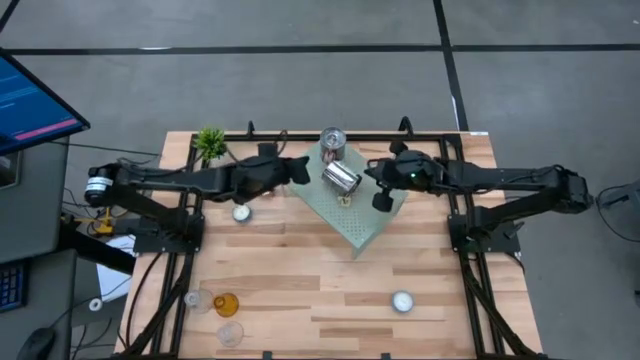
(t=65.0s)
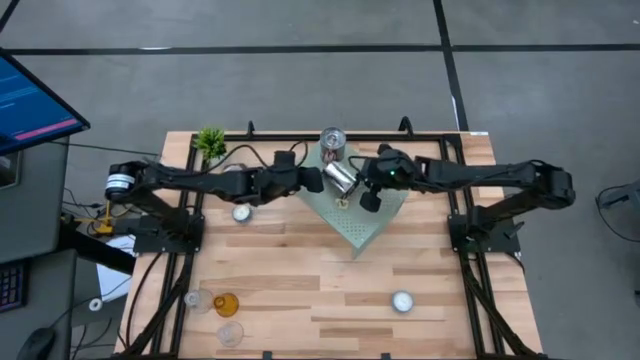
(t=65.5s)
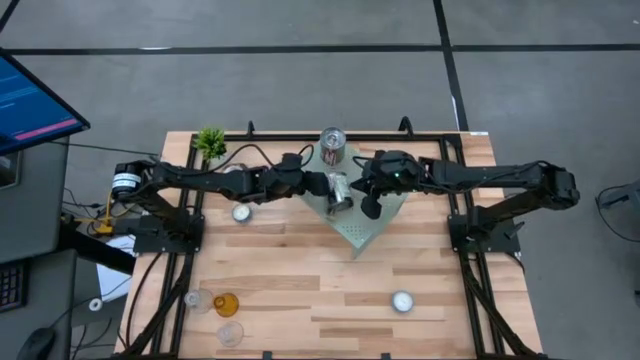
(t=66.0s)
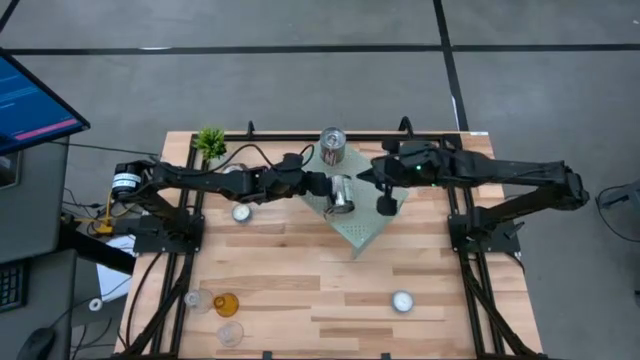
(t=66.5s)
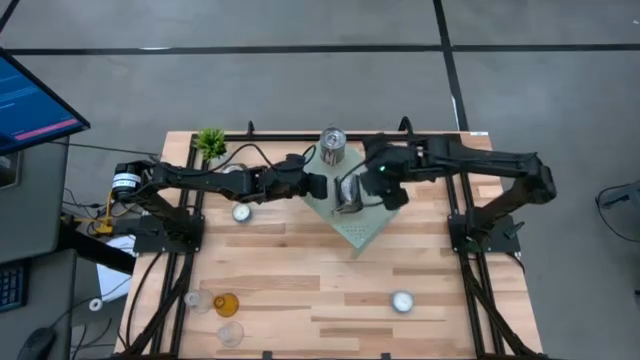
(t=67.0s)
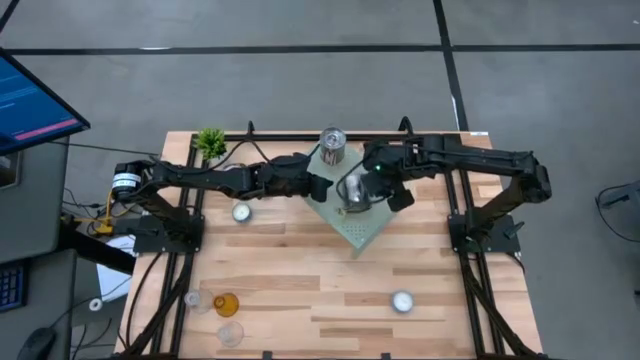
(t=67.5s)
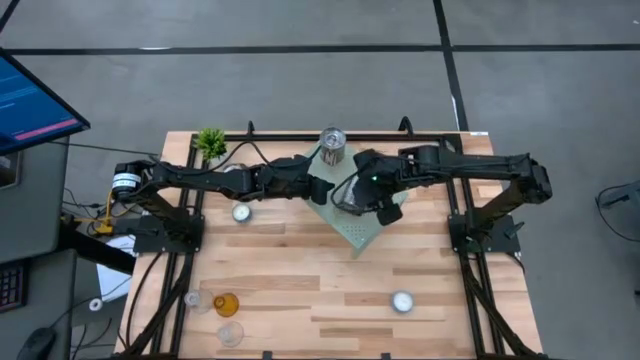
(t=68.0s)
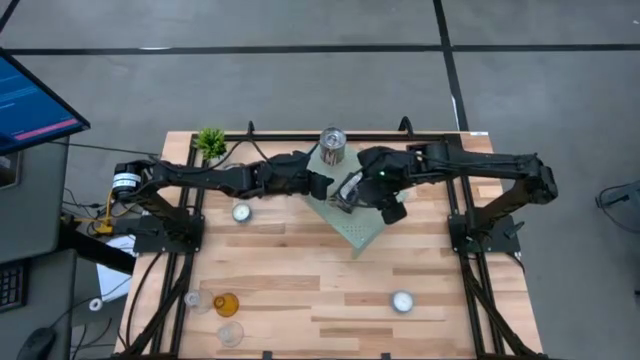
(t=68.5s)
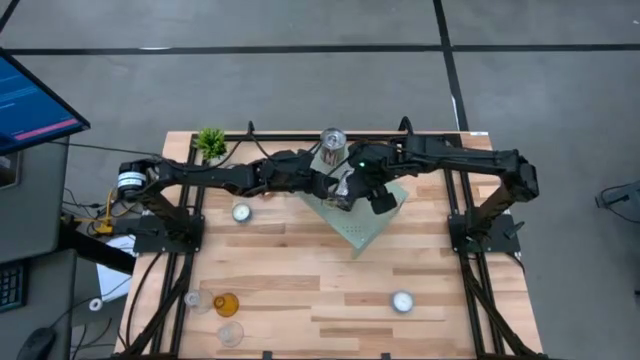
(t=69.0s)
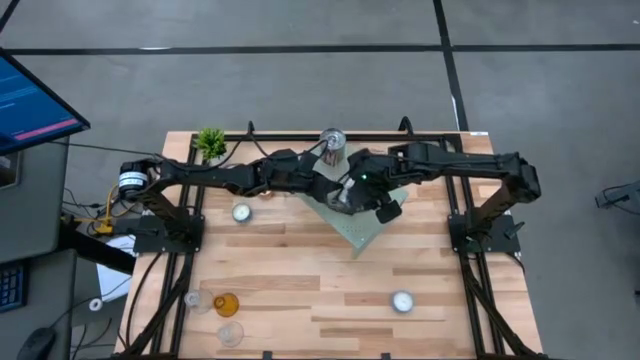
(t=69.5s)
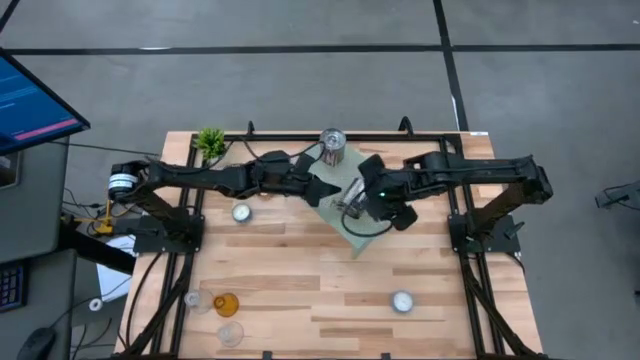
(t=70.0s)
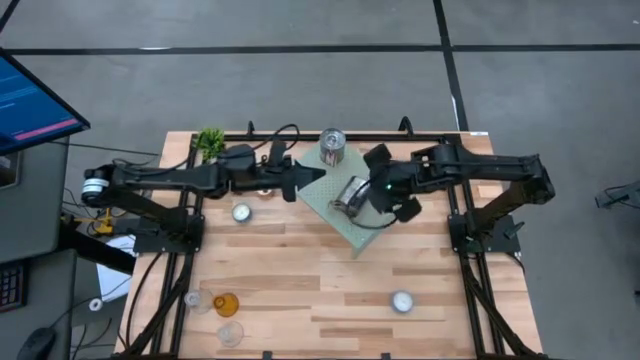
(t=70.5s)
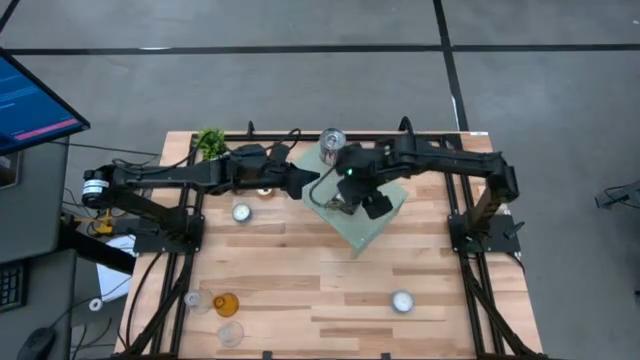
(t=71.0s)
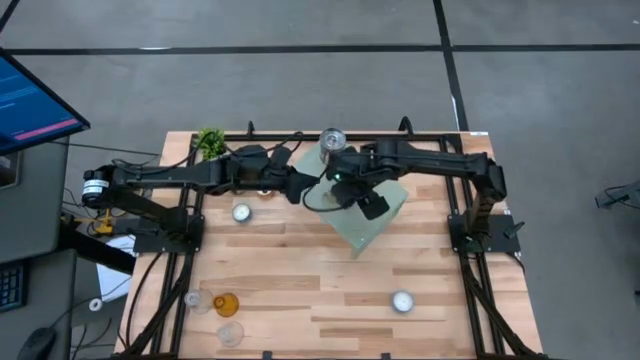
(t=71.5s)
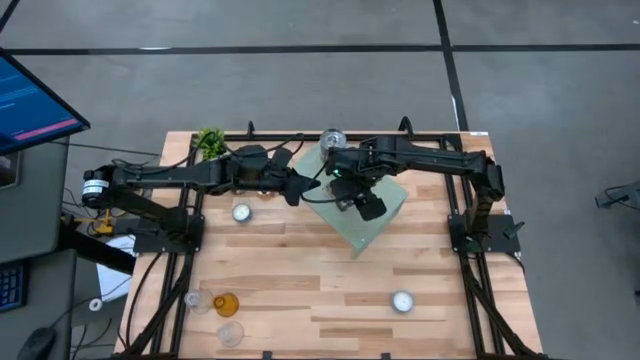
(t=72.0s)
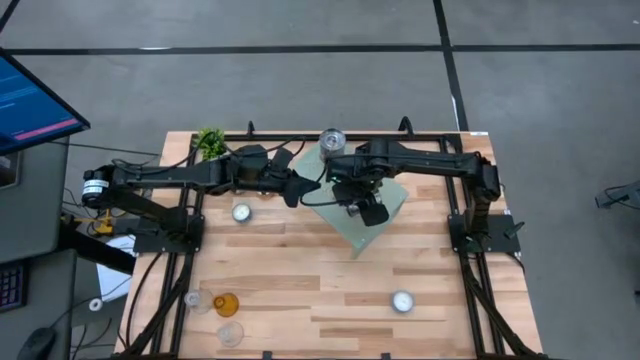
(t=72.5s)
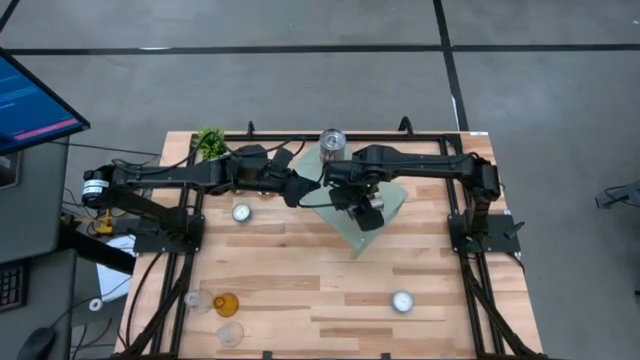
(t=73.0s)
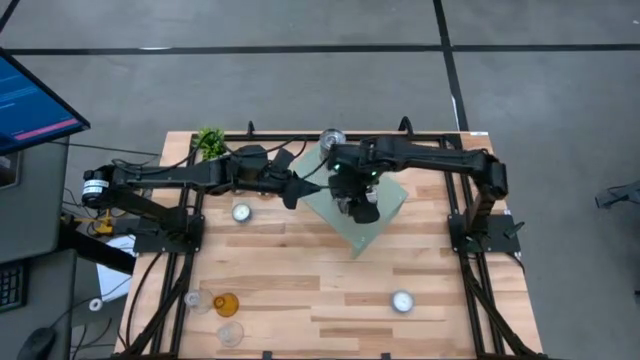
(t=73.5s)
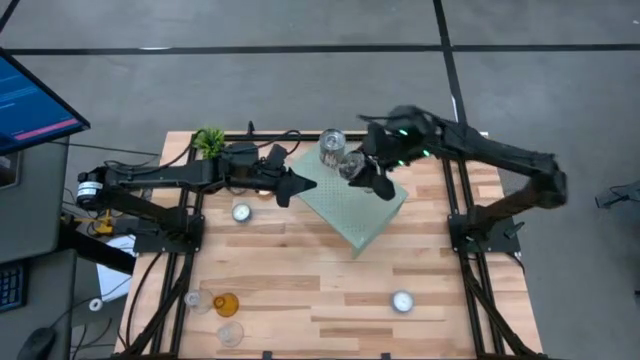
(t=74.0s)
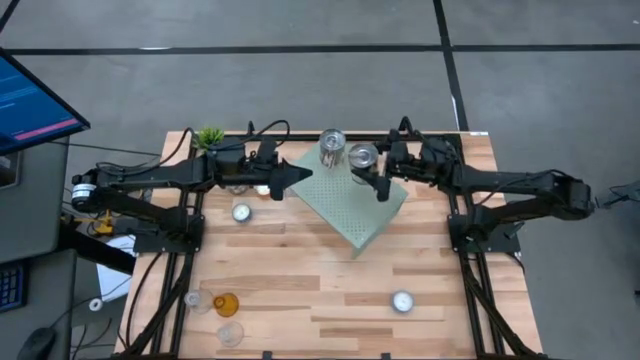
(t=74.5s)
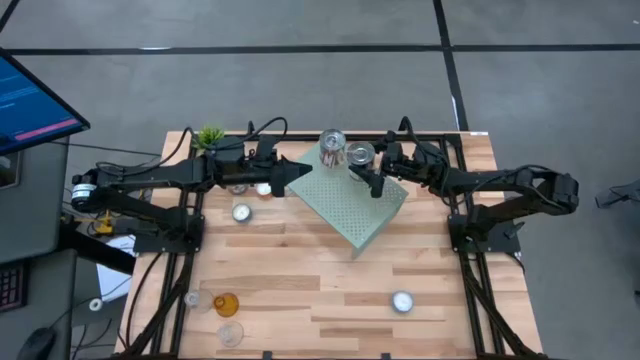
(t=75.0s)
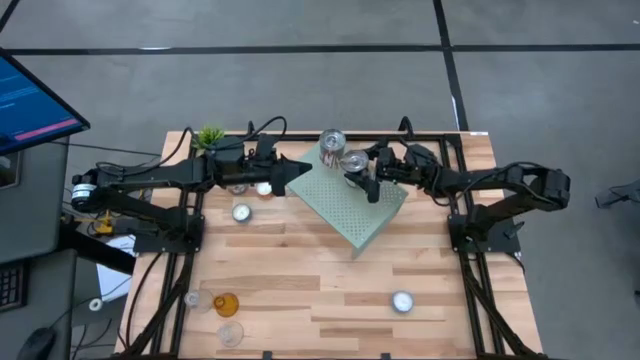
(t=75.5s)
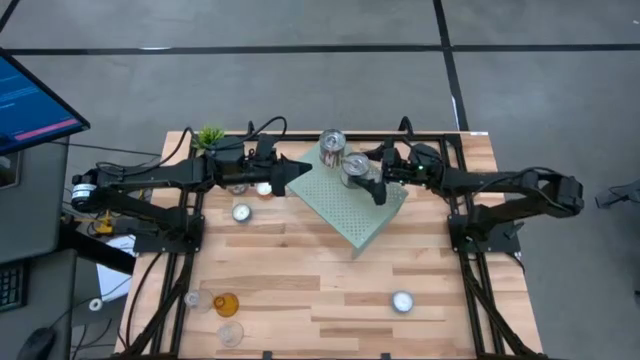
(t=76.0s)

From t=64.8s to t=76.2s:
Task: Stock candles on shelf
Put the bottom silver scented candle on the shelf

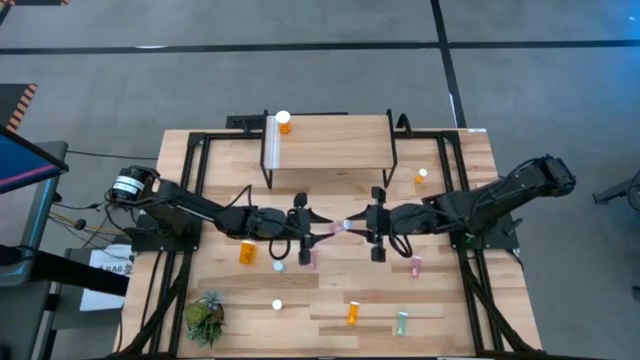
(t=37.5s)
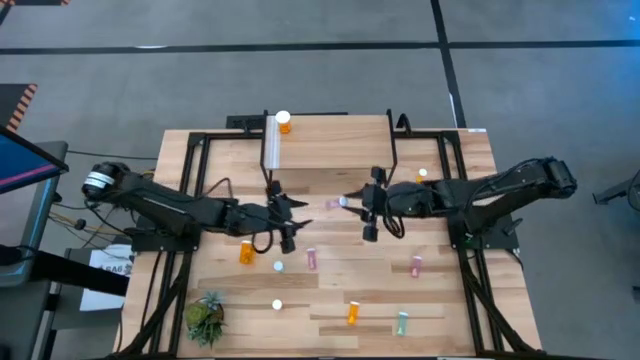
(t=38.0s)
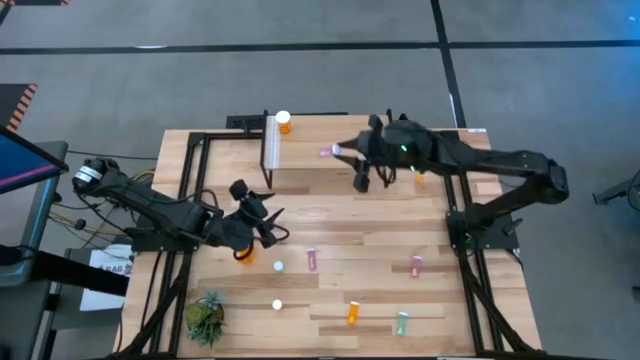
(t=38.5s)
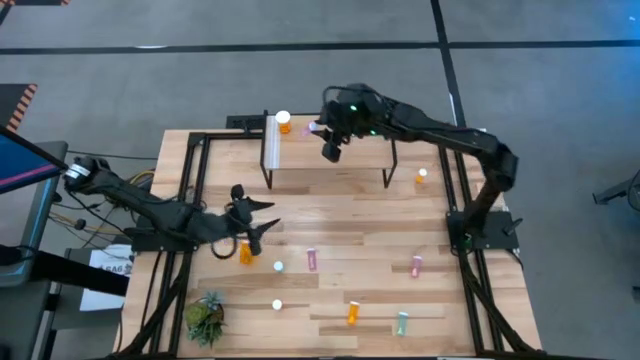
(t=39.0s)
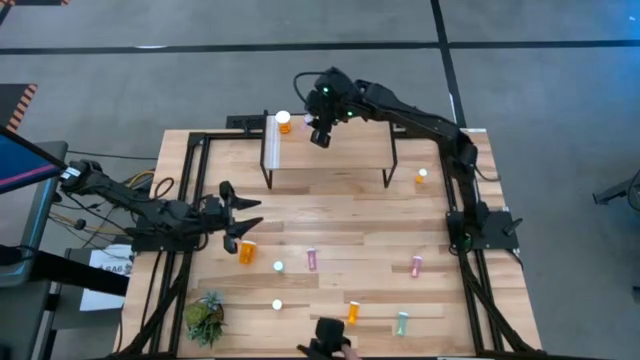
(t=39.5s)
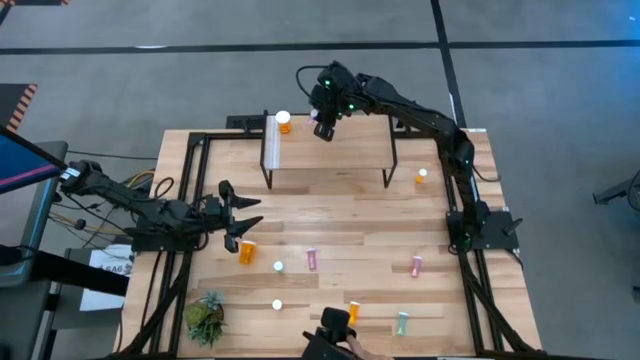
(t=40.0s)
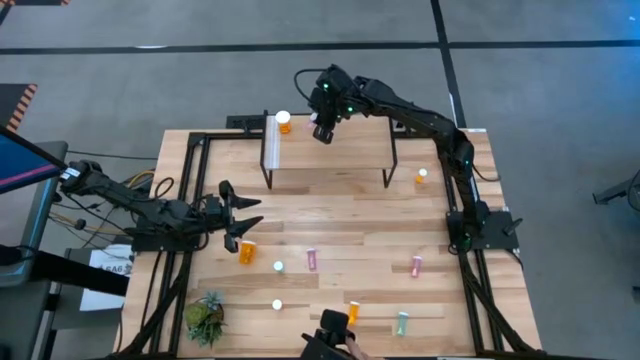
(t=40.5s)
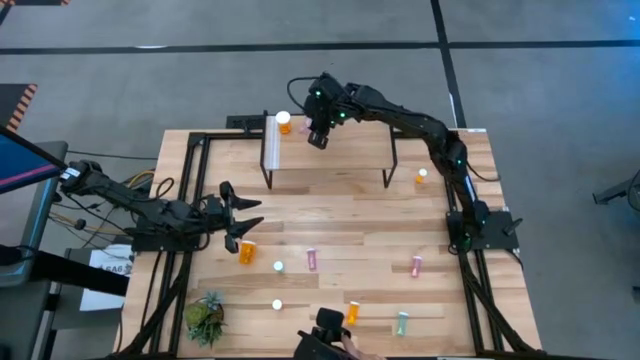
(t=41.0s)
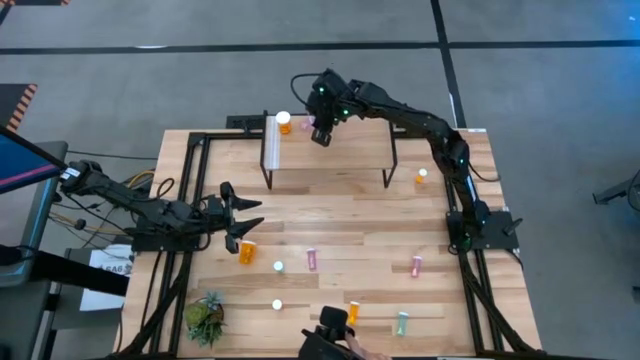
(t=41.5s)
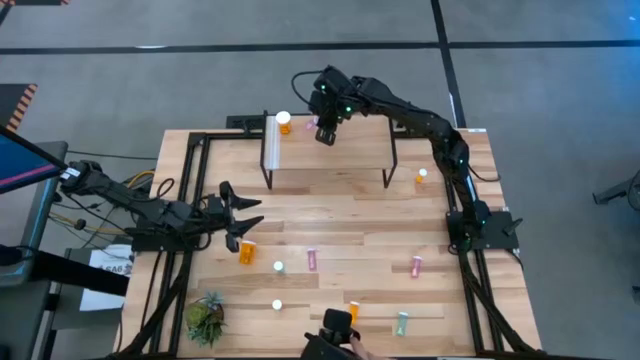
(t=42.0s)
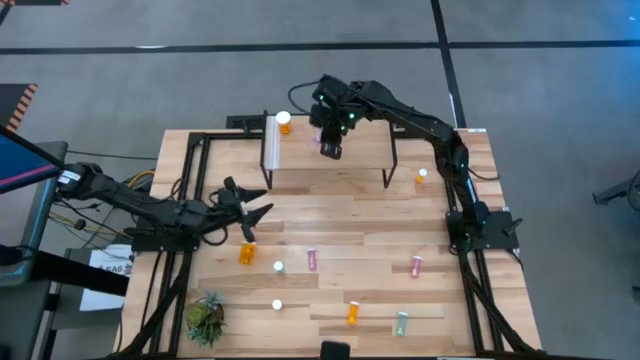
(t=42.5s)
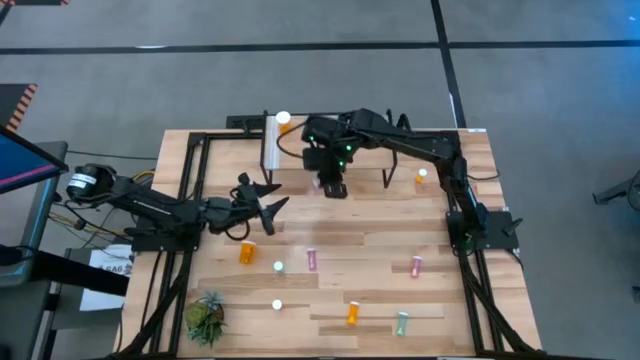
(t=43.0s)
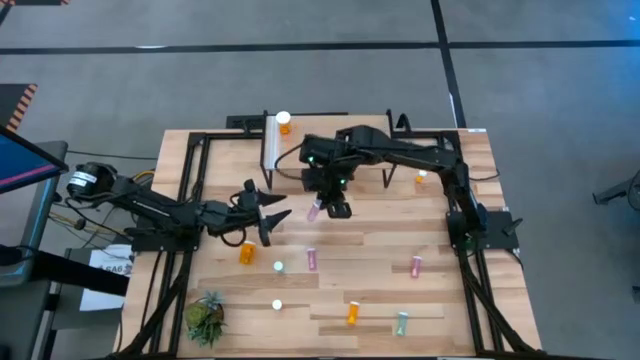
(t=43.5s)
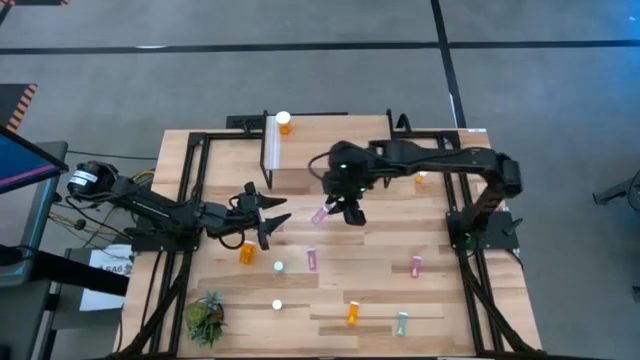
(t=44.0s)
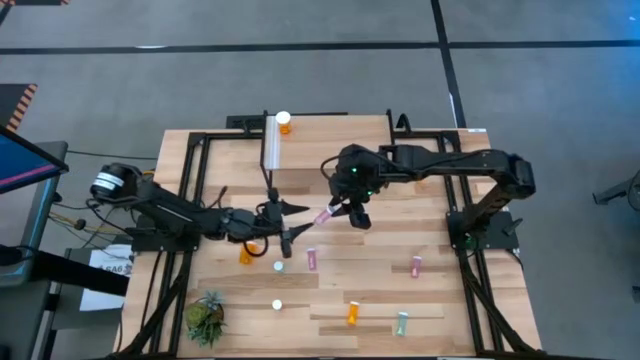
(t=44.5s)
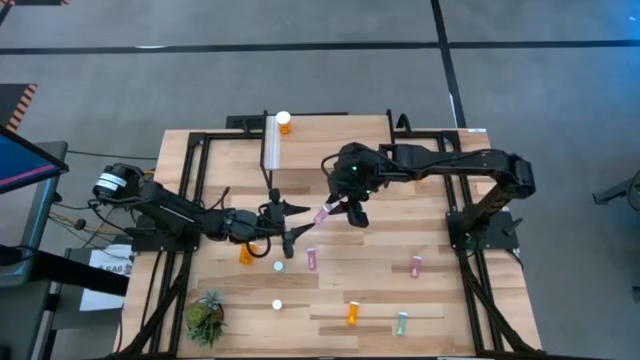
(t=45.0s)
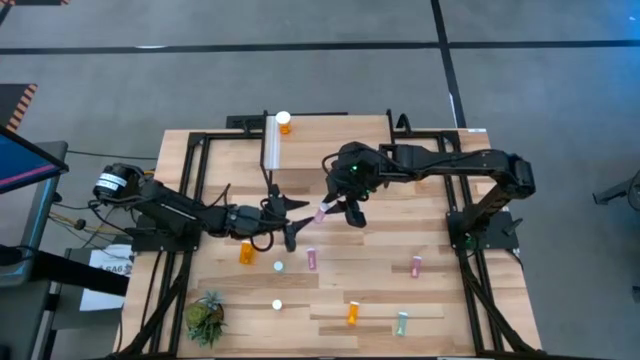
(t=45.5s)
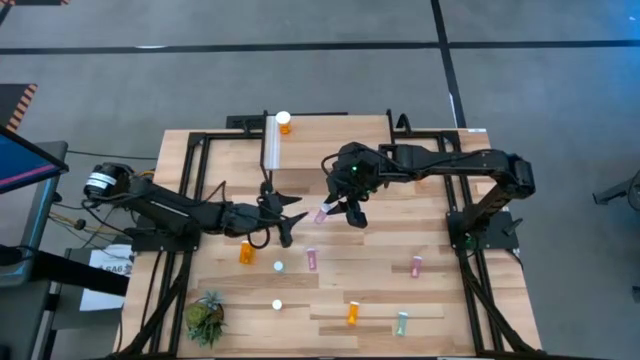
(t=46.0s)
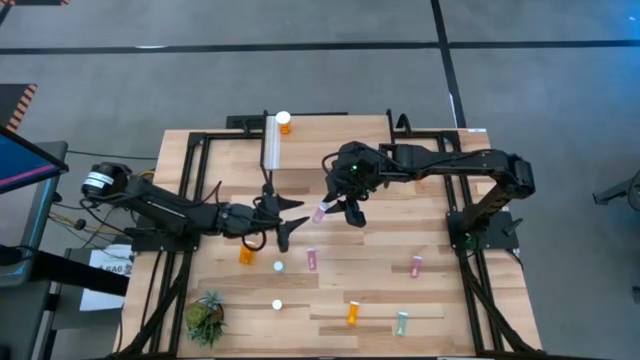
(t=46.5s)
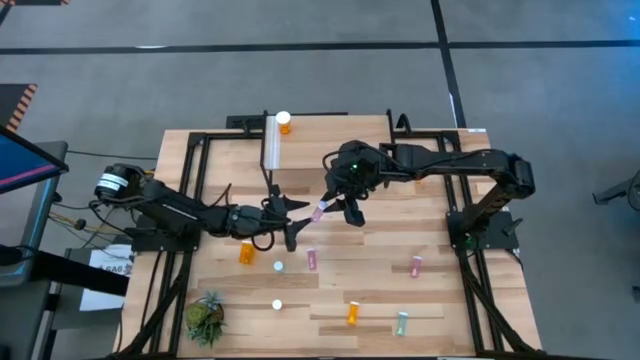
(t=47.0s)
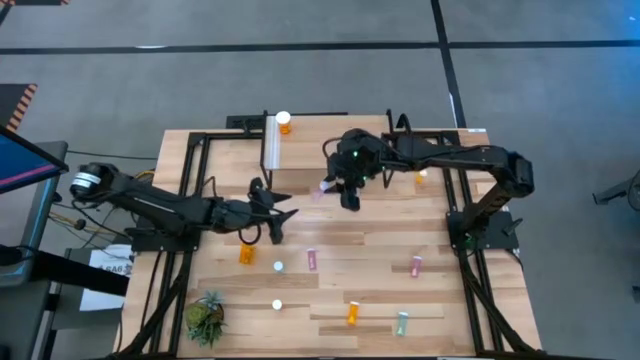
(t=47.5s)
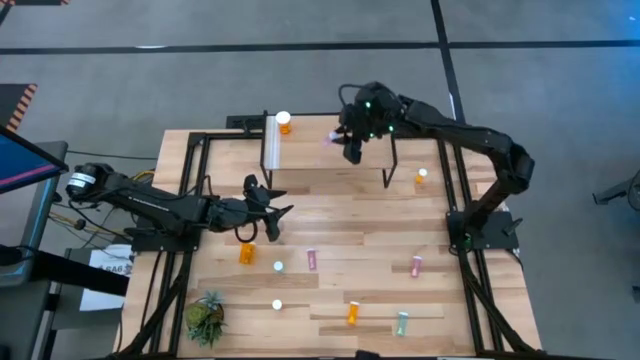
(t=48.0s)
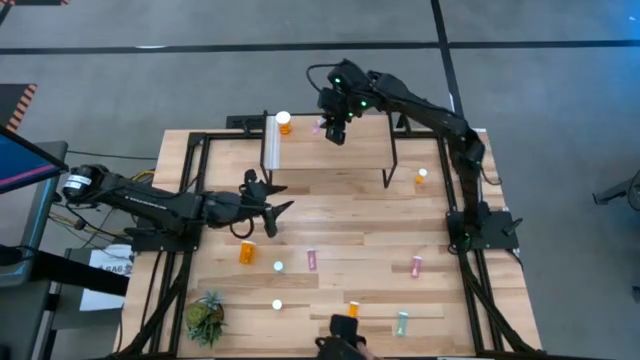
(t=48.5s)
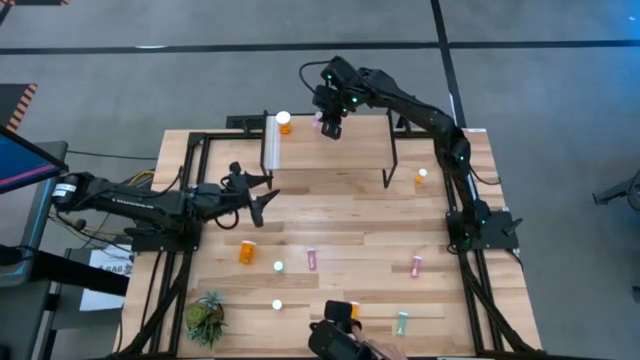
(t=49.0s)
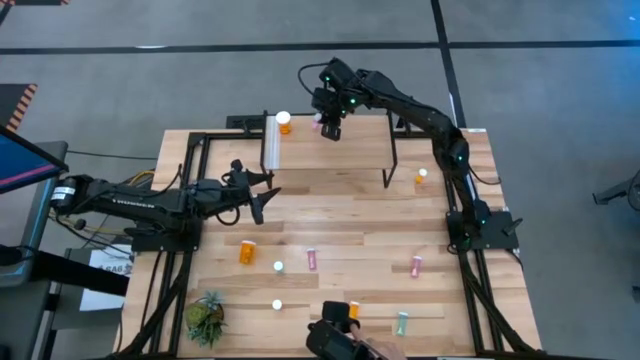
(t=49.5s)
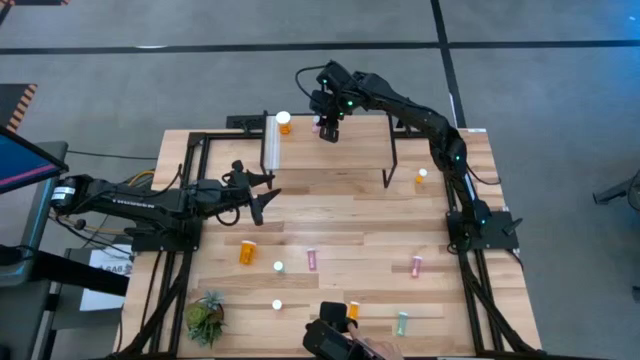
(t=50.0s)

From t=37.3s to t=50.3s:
Task: Pick and place medicine bottles onto shelf by color
Put the middle pink pill bottle on the shelf
